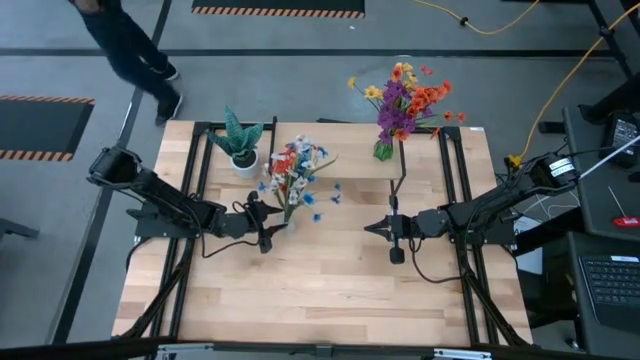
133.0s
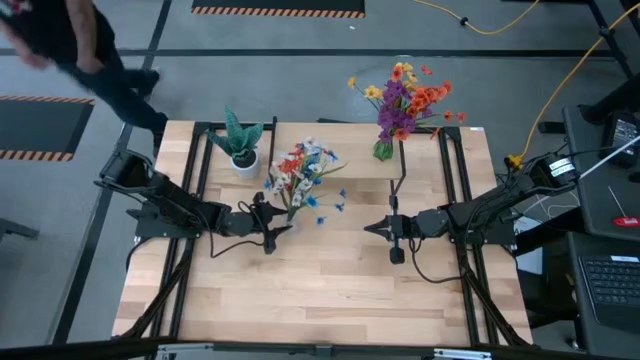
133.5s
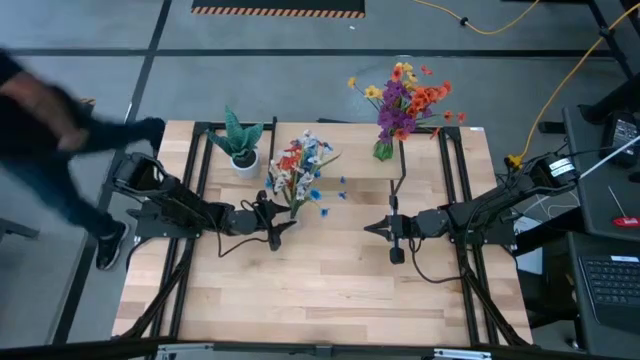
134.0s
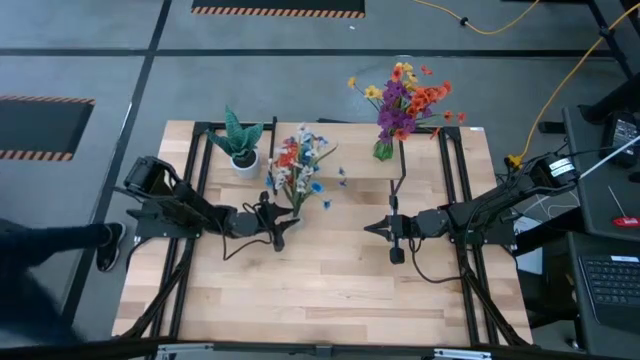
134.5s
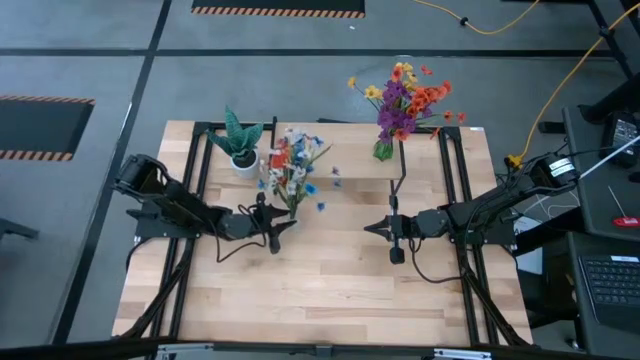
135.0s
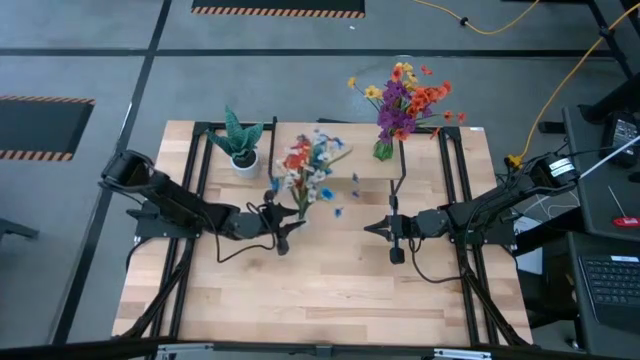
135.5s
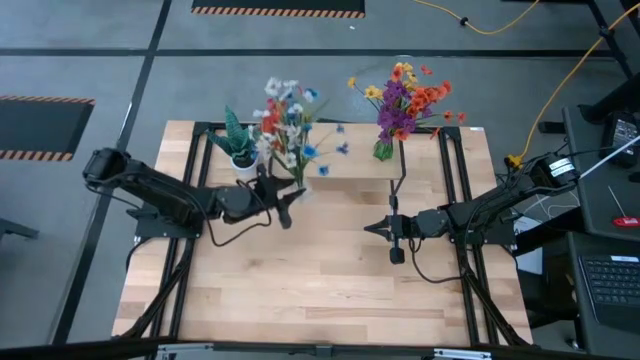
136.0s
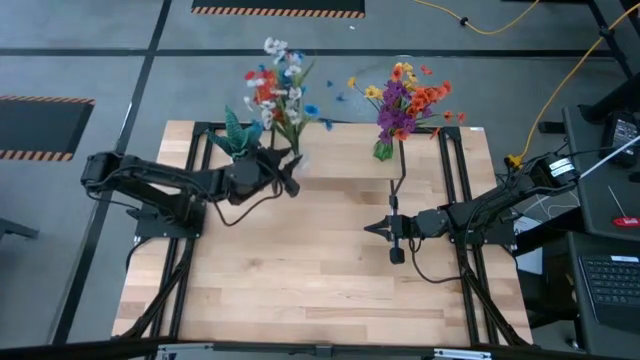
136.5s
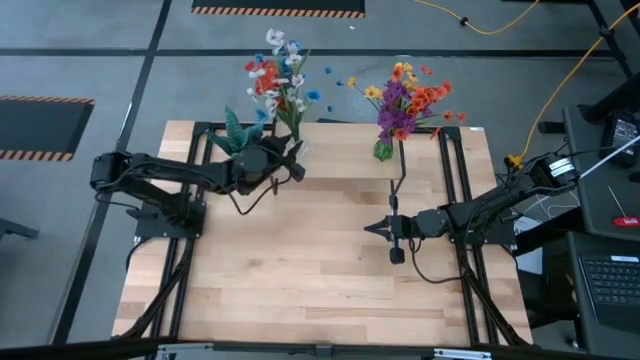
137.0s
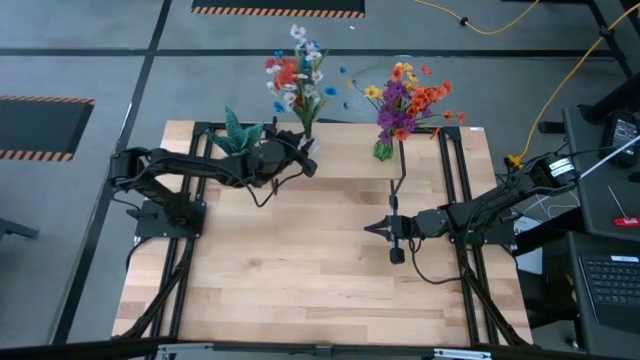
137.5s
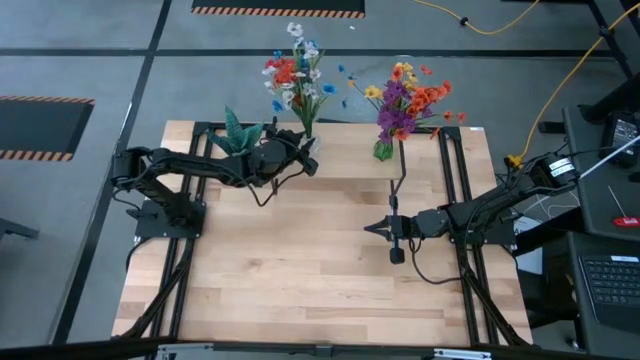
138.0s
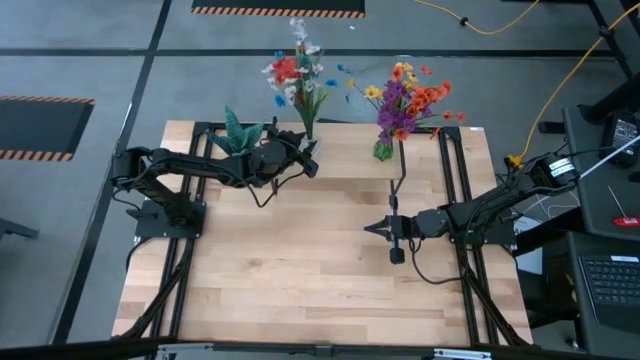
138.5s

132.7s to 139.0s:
Task: Pick and place flowers into a vace then onto a shelf
Put the transparent flower vase on the shelf

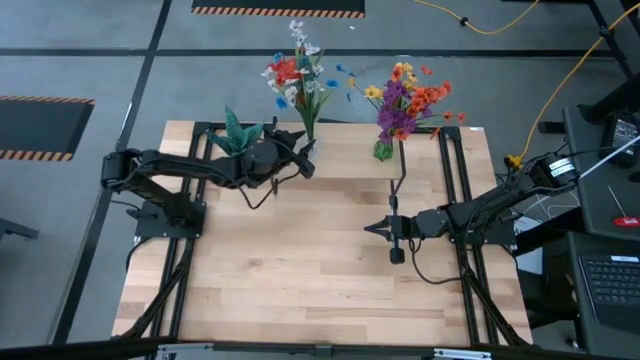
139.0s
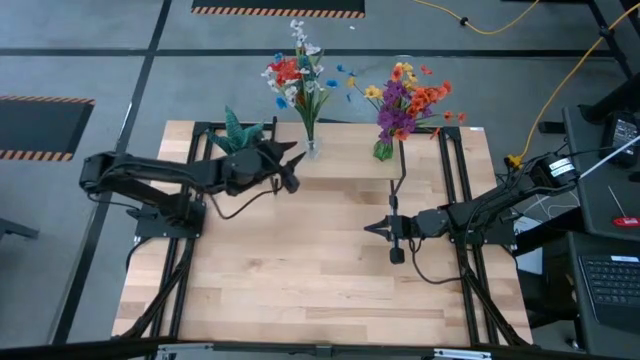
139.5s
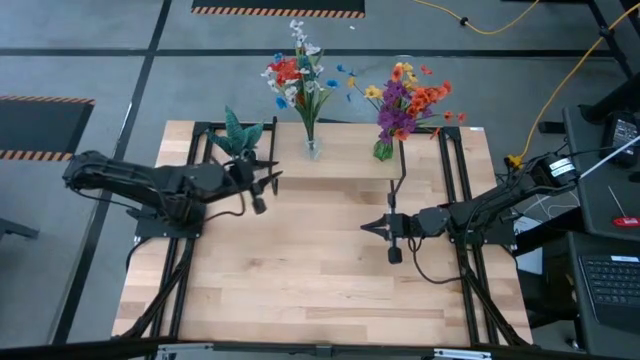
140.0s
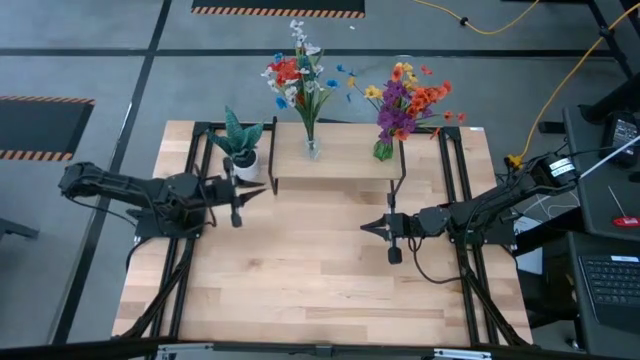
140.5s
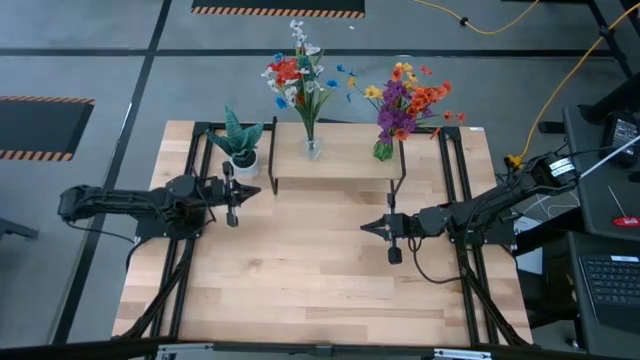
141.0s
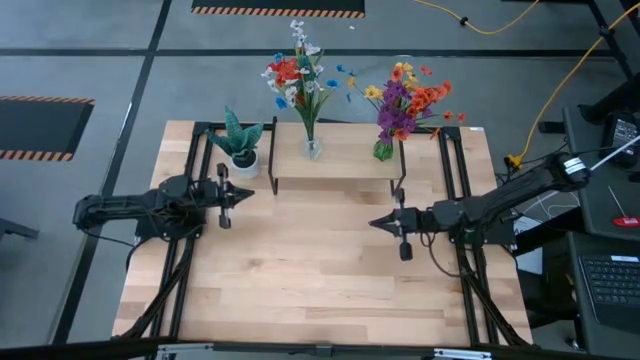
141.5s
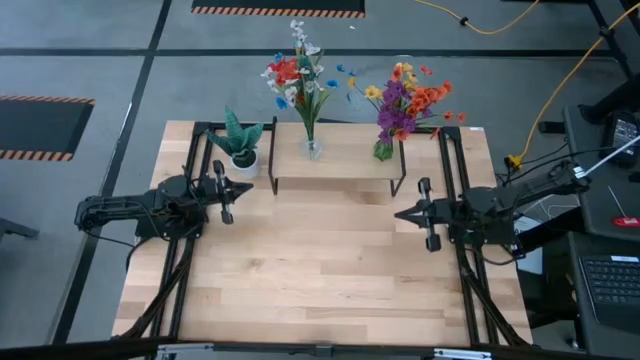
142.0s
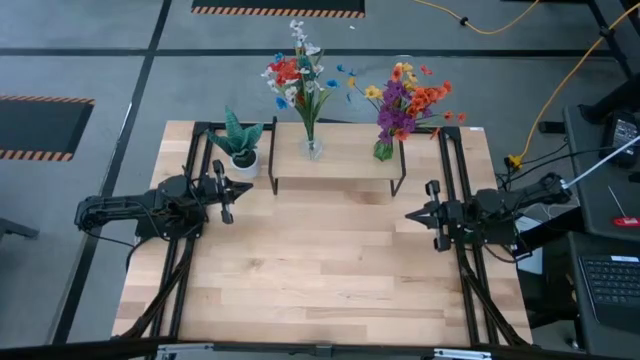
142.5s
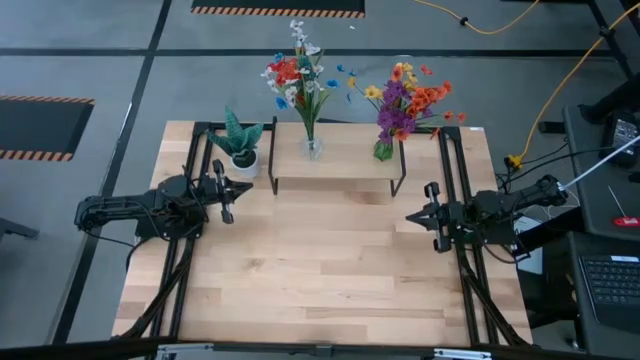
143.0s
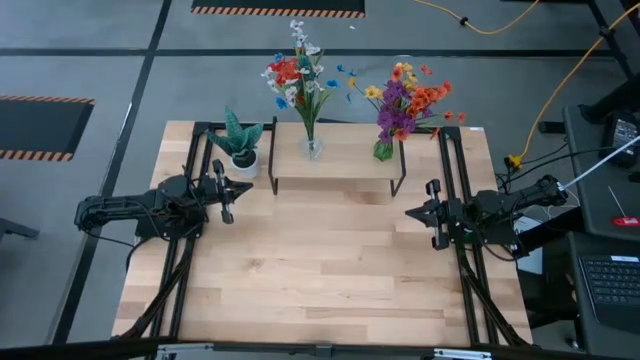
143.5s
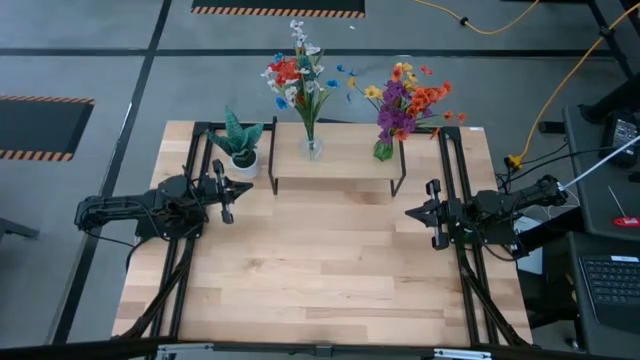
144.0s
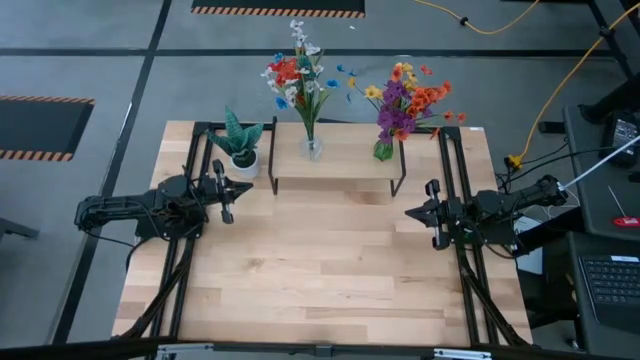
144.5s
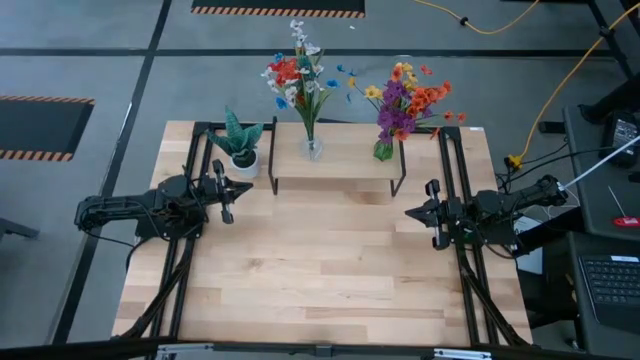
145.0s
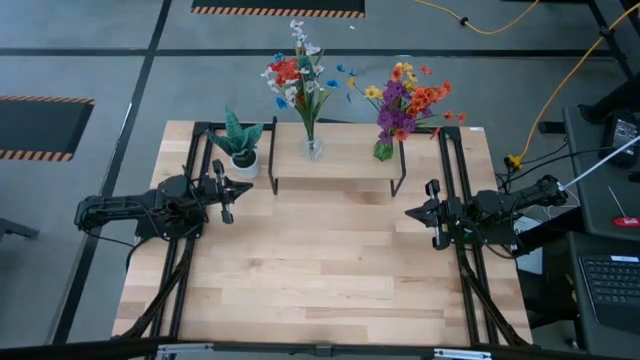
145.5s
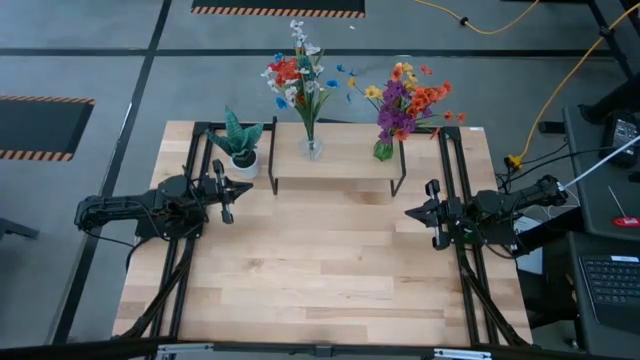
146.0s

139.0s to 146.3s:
Return to Home position

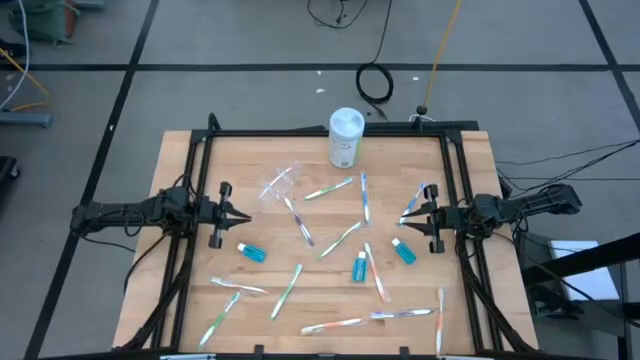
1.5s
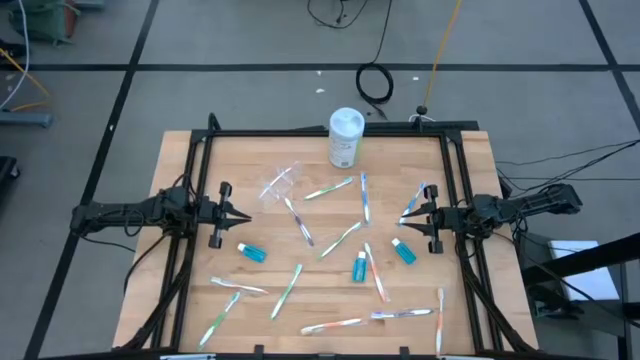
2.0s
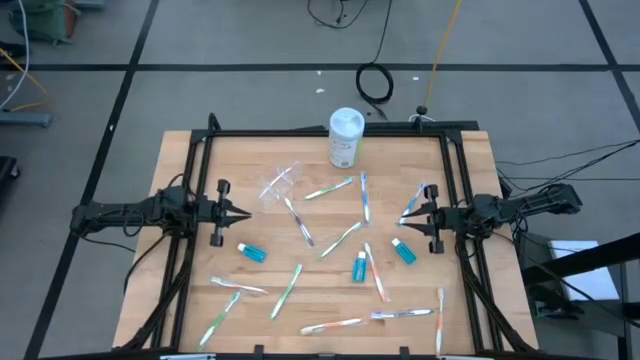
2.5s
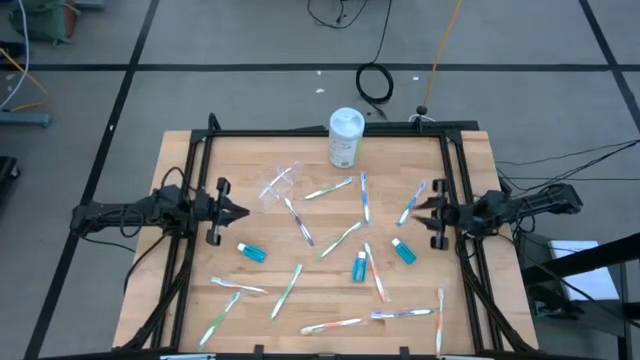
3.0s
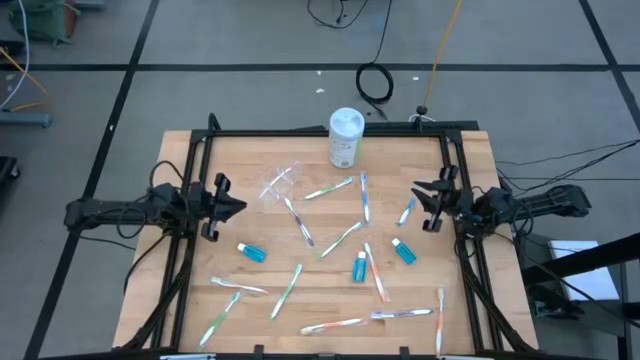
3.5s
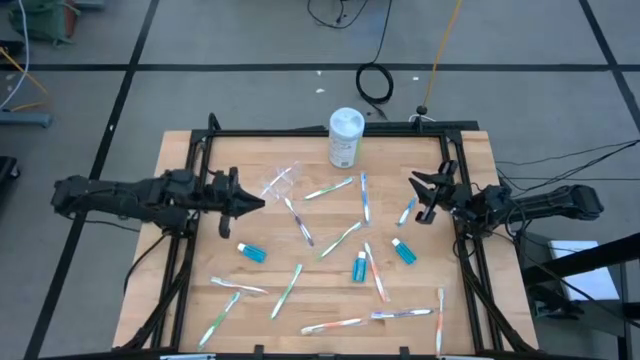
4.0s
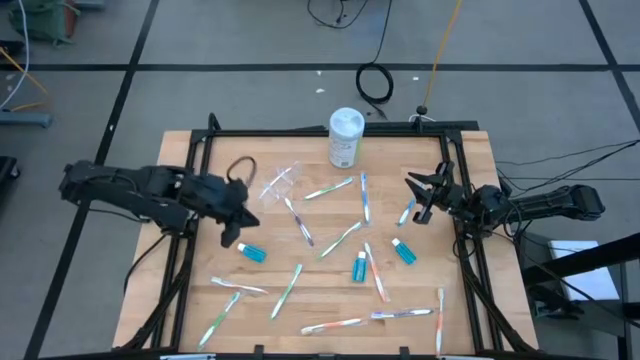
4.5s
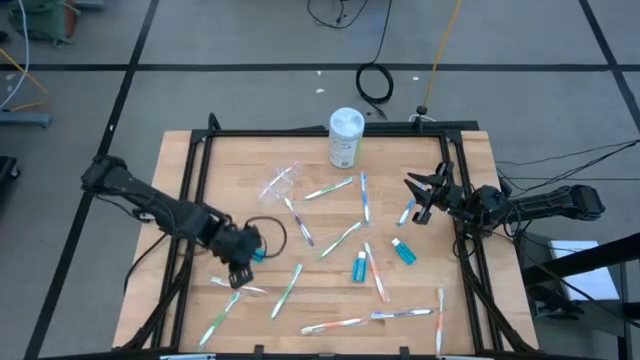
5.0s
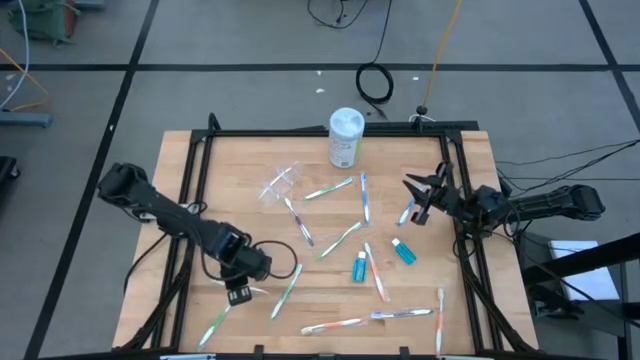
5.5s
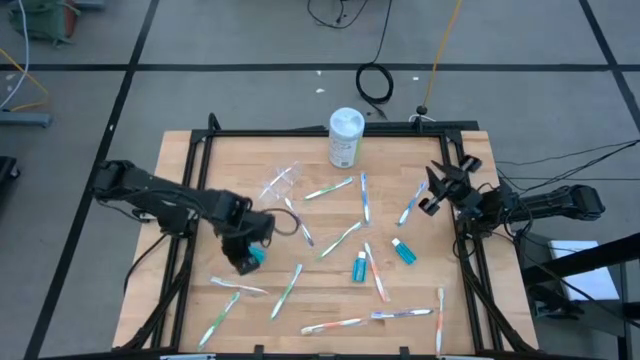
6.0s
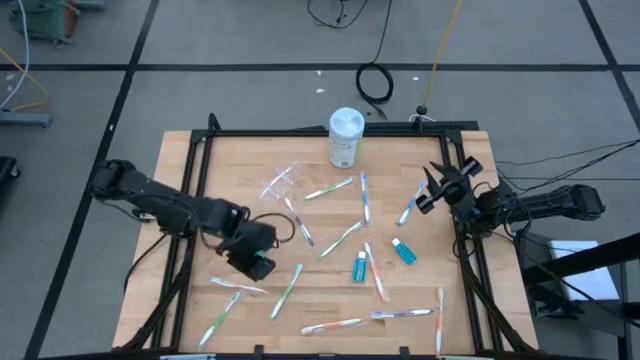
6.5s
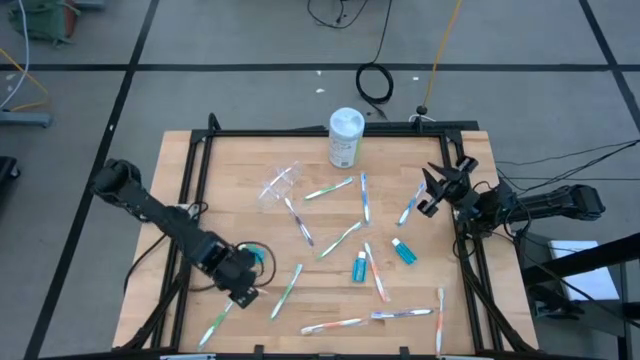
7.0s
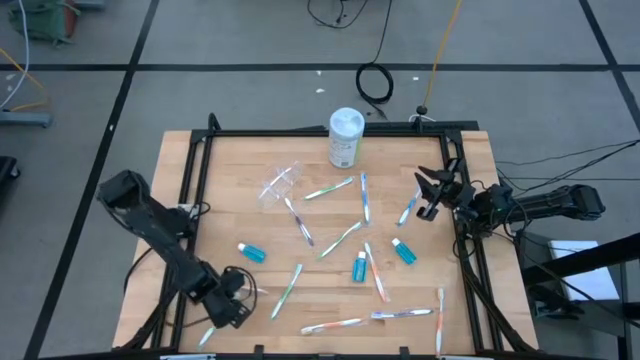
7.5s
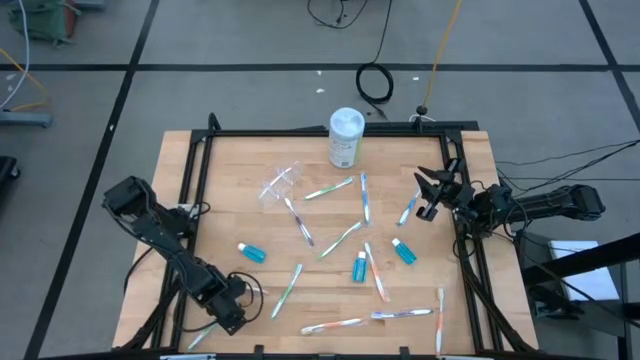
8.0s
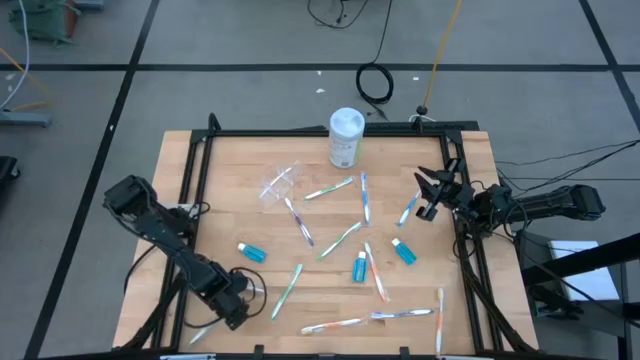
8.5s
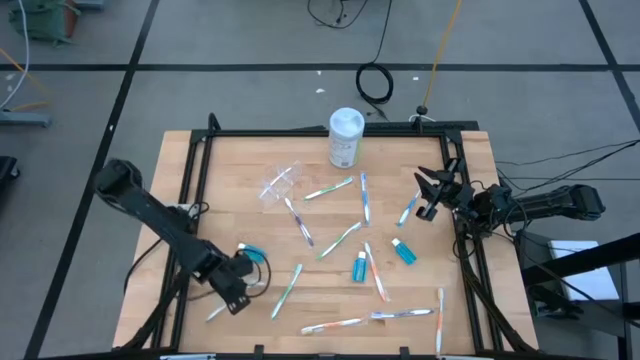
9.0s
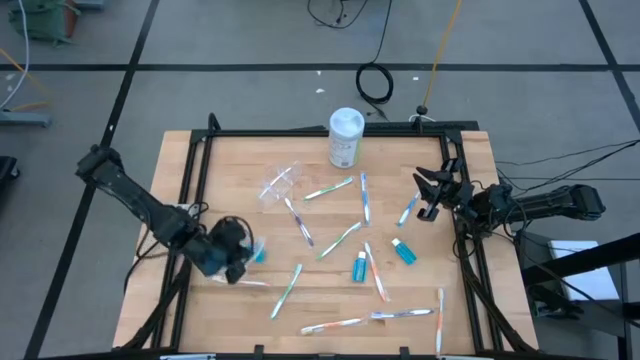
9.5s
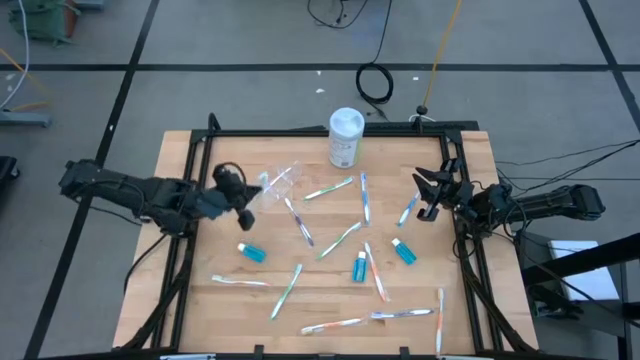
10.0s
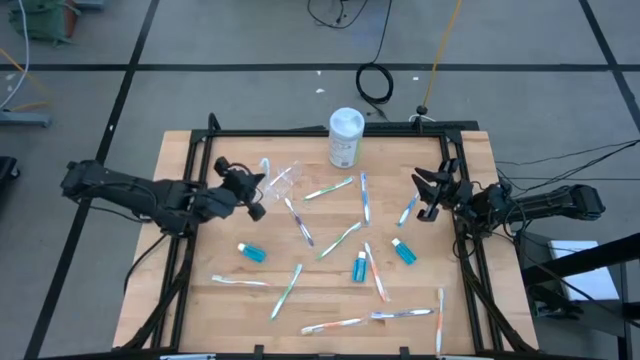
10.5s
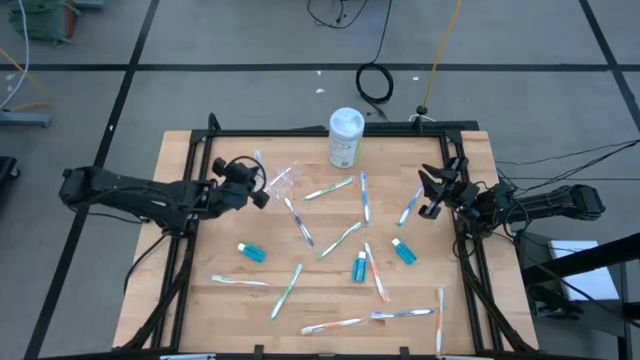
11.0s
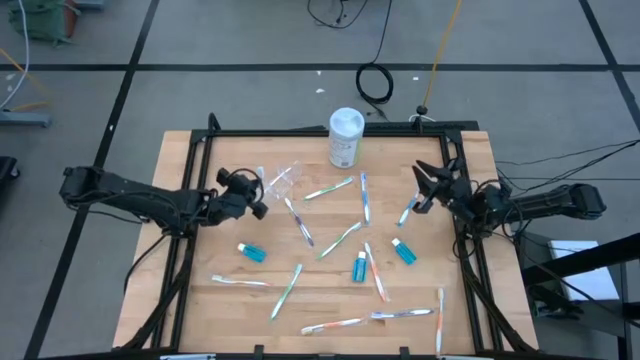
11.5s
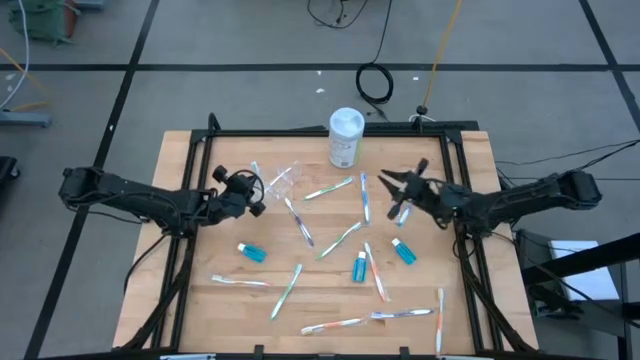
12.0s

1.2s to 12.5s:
Task: Pick & Place toothbrushing station
Put the green toothbrush into the left of the transparent organizer
